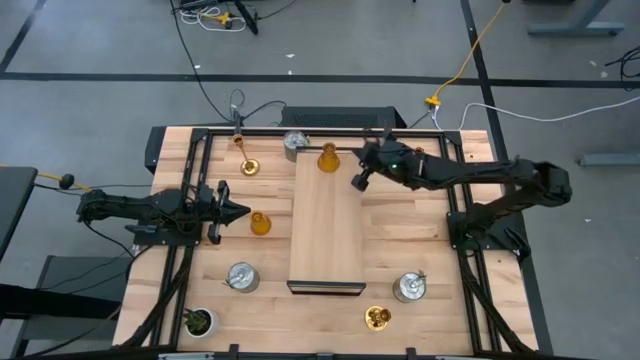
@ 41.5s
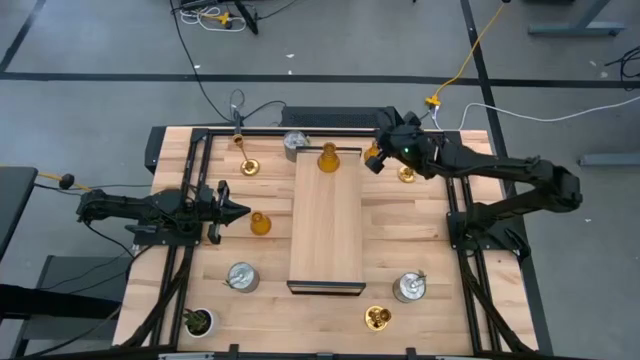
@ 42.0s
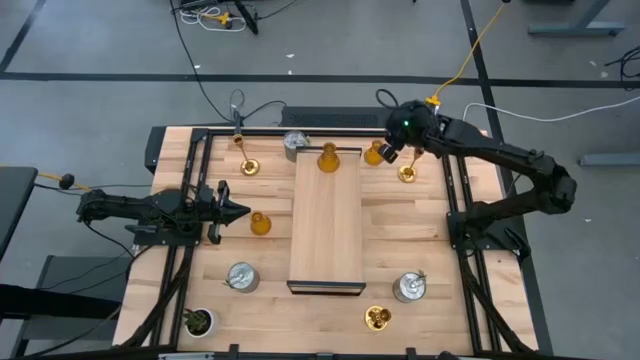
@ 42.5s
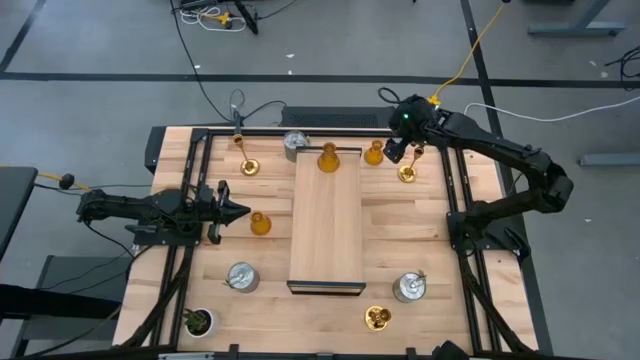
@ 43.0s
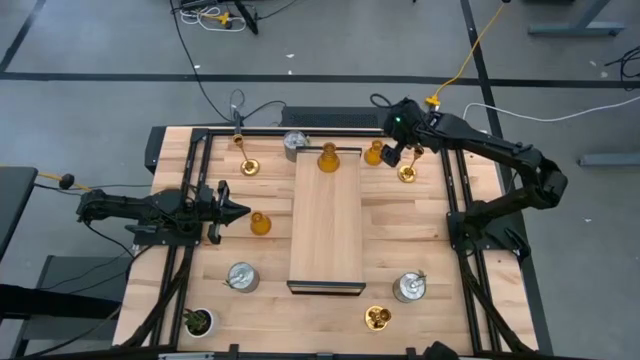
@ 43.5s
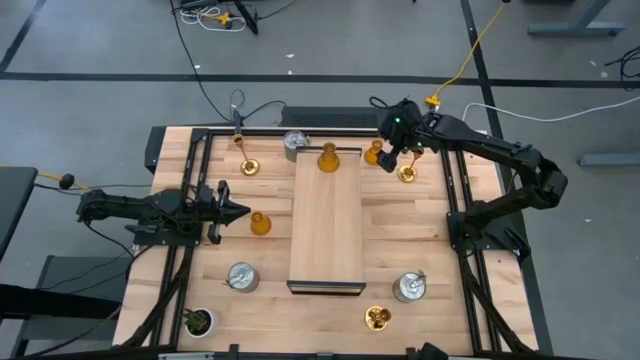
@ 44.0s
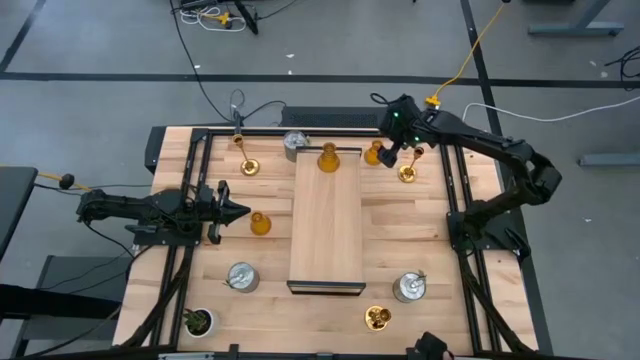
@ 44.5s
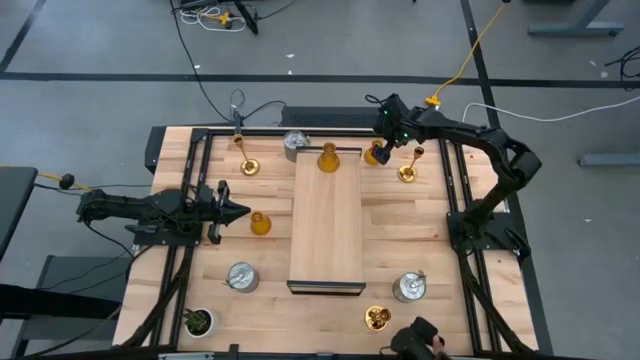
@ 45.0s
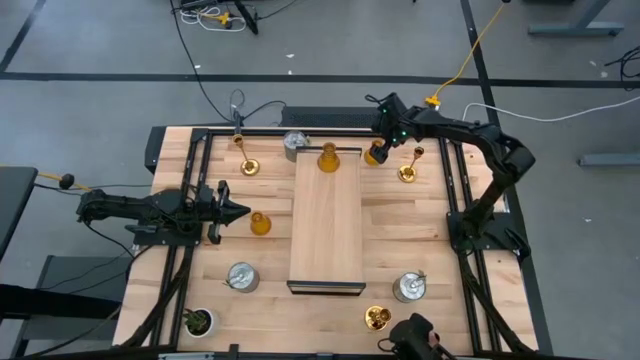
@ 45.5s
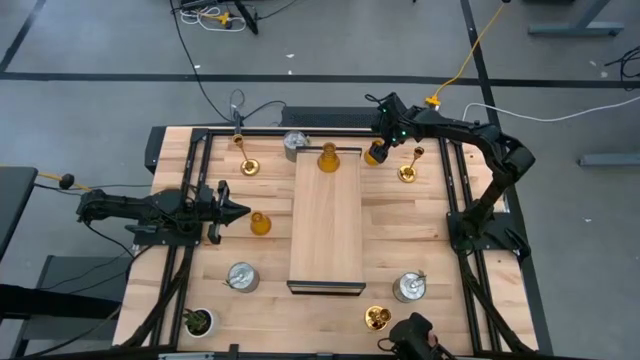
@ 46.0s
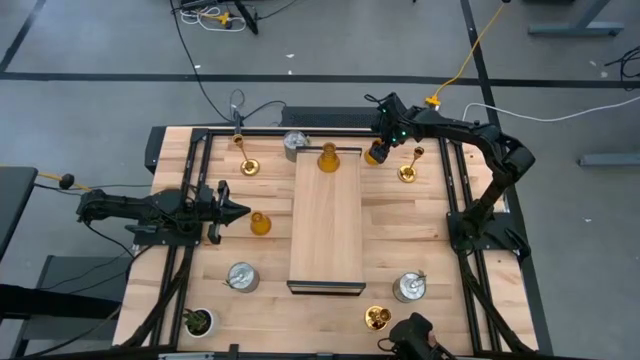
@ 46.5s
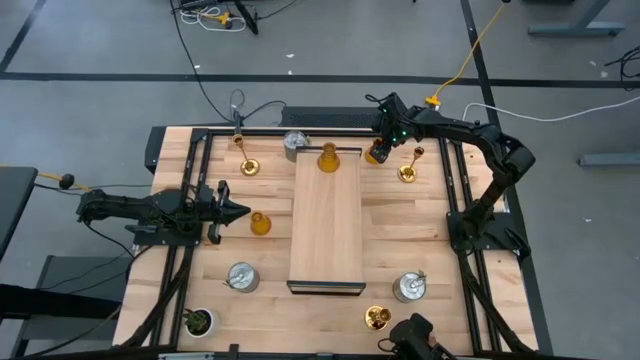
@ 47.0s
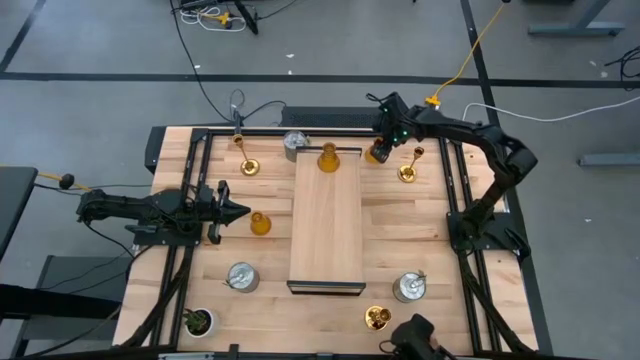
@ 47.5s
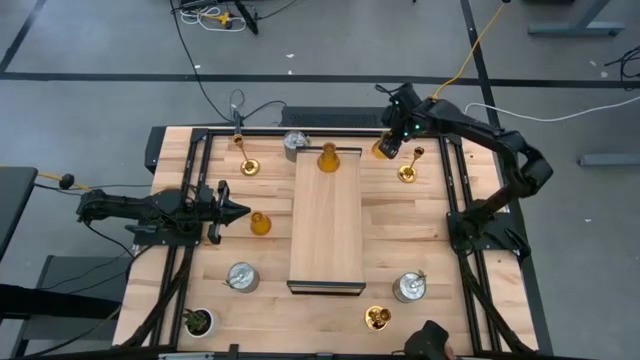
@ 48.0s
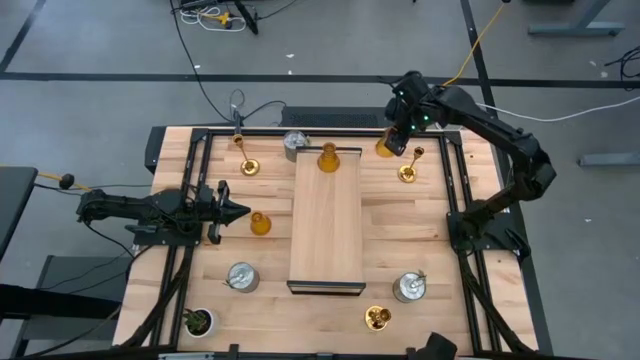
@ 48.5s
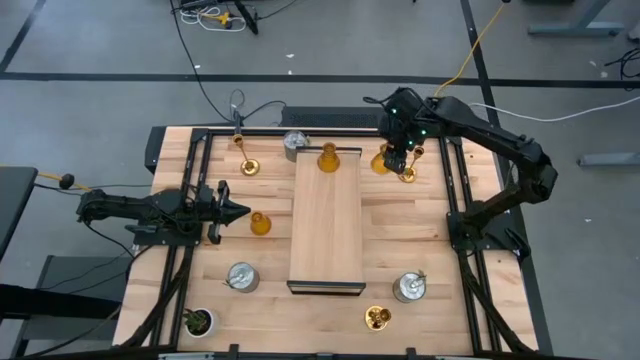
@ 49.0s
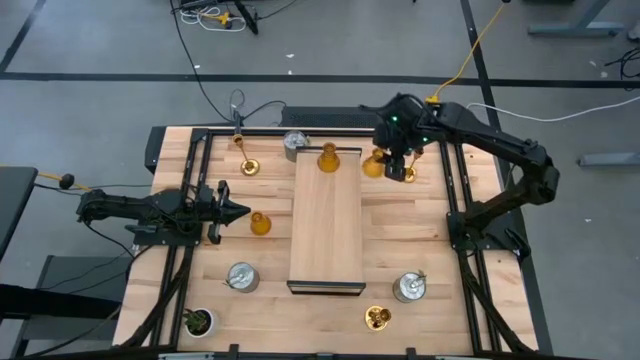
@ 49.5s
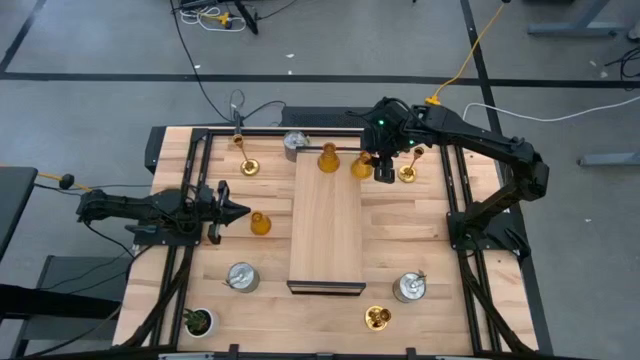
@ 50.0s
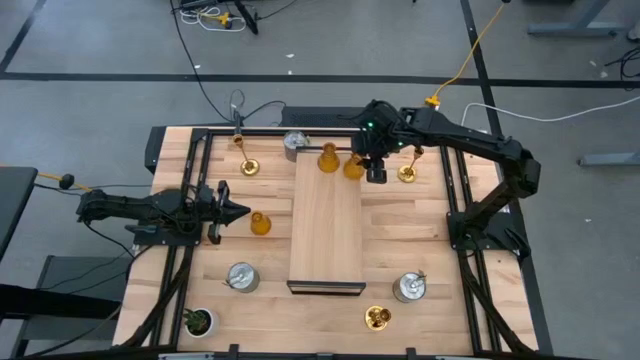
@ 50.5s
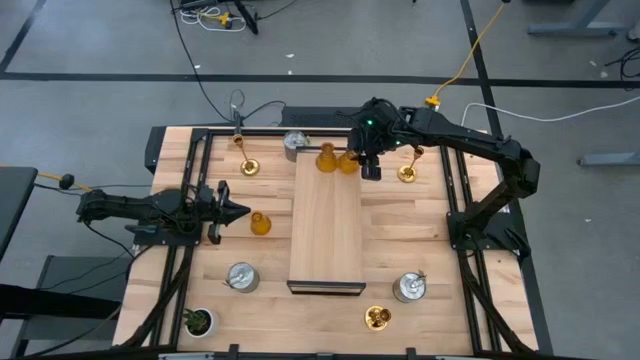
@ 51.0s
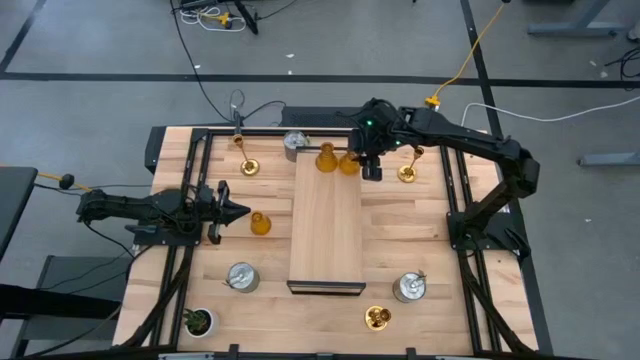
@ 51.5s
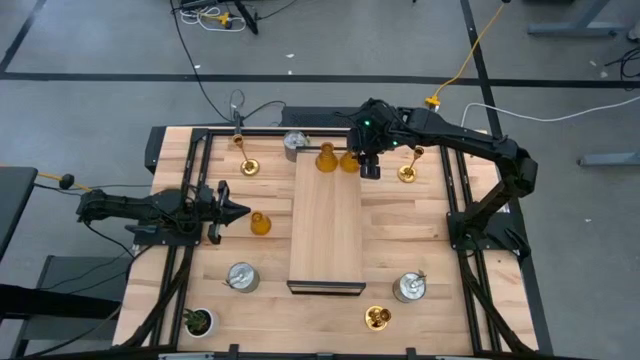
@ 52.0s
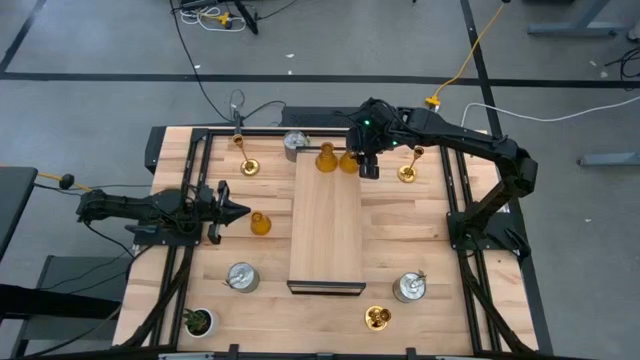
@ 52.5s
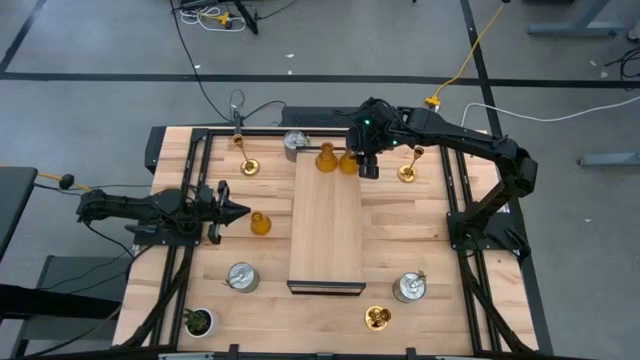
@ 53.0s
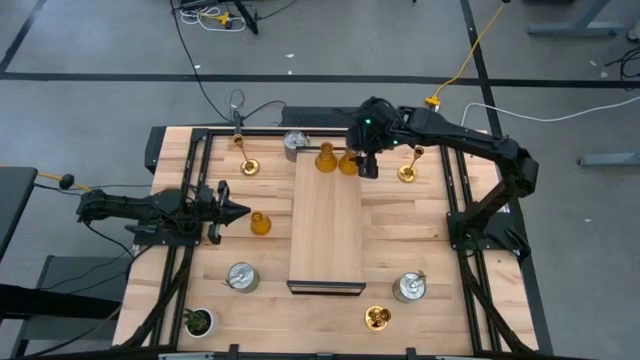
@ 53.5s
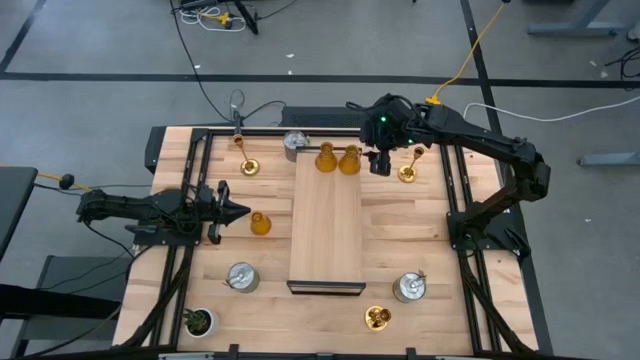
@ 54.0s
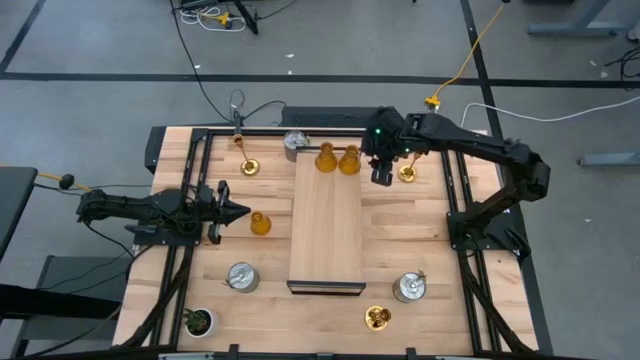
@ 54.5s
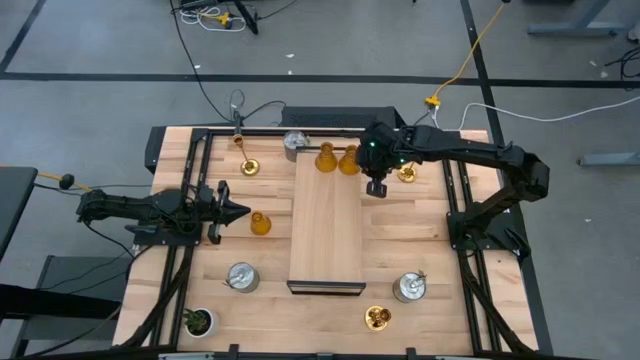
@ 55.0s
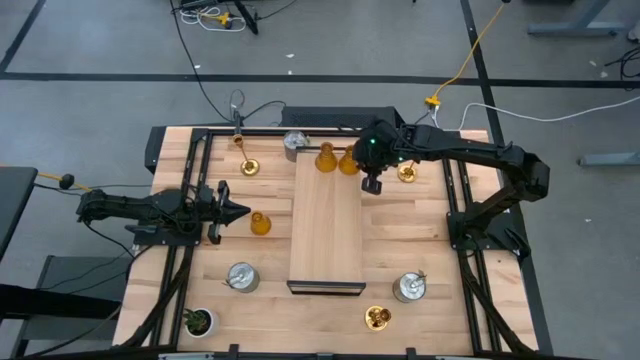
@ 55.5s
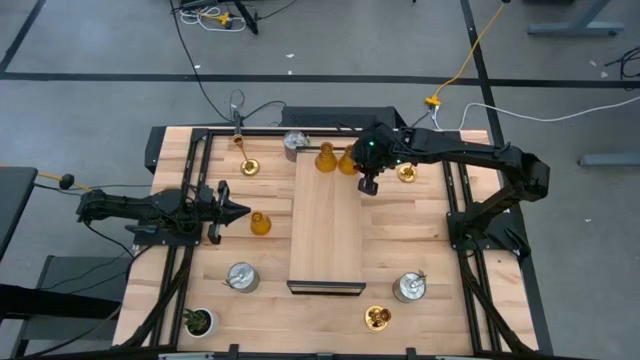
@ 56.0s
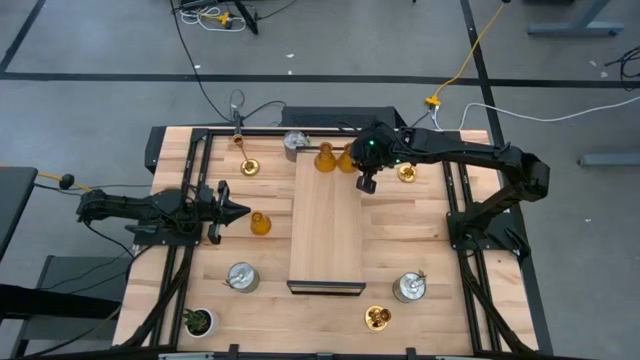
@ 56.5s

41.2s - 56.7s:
Task: Pick & Place candle stick holders
Put the top right glass candle holder on the shelf aligned with the other glass candle holder

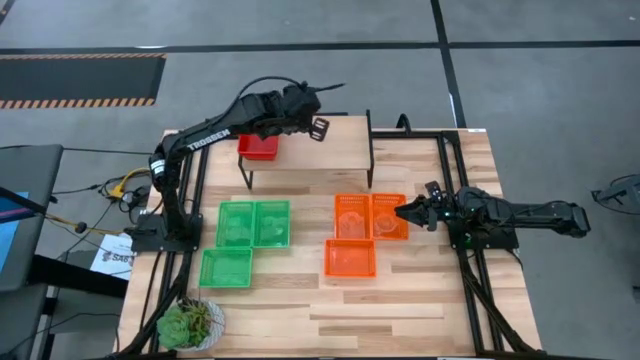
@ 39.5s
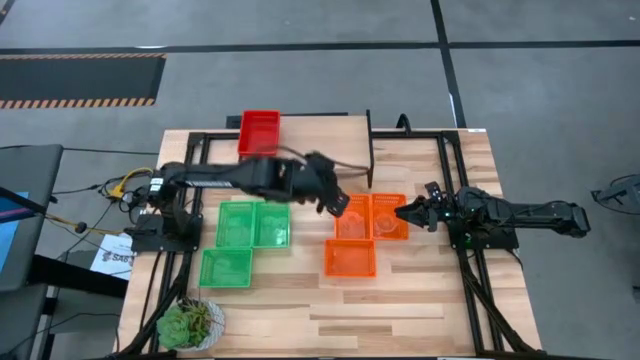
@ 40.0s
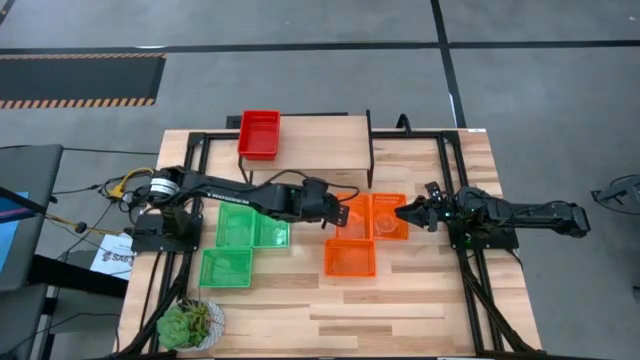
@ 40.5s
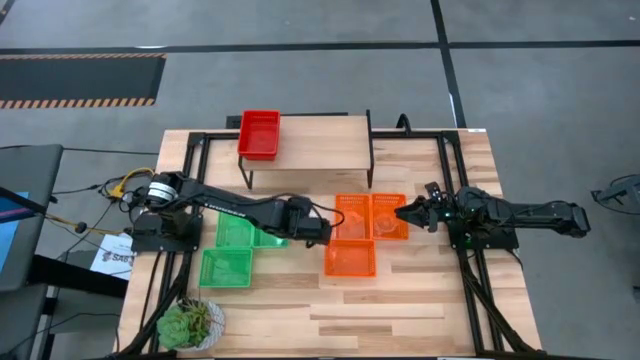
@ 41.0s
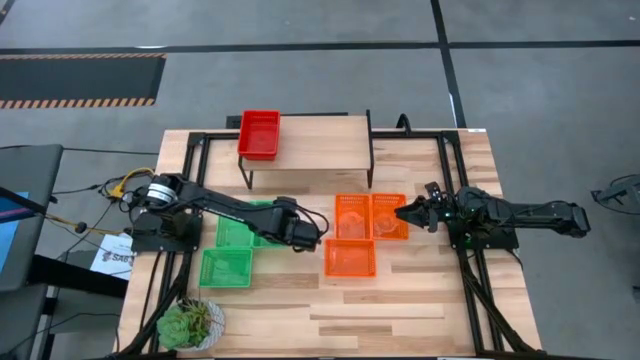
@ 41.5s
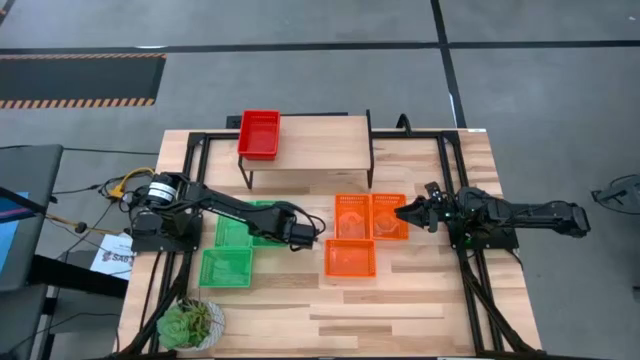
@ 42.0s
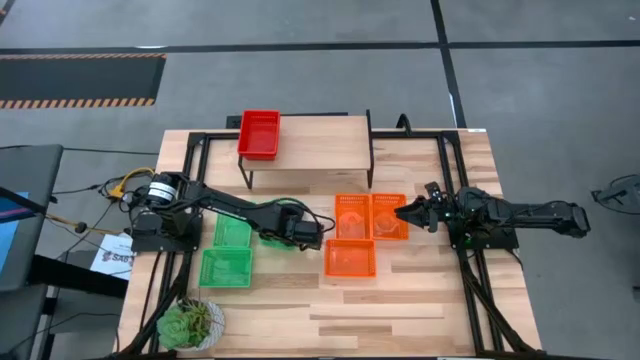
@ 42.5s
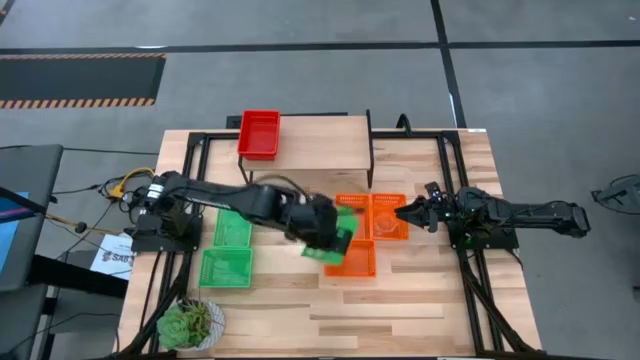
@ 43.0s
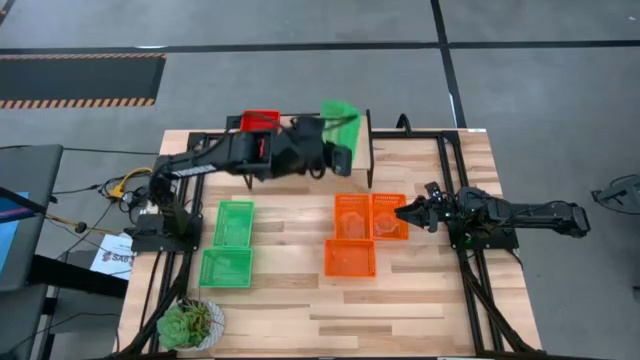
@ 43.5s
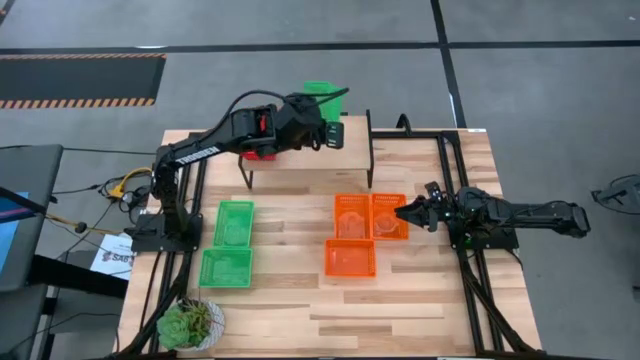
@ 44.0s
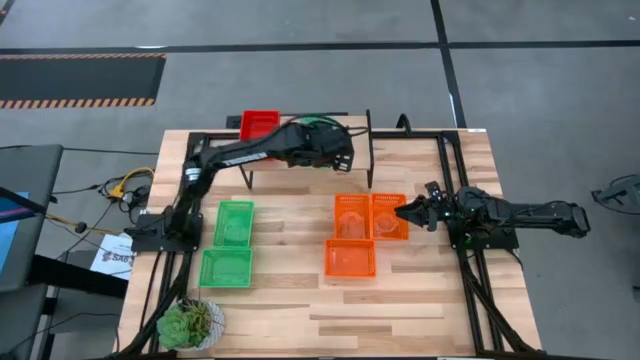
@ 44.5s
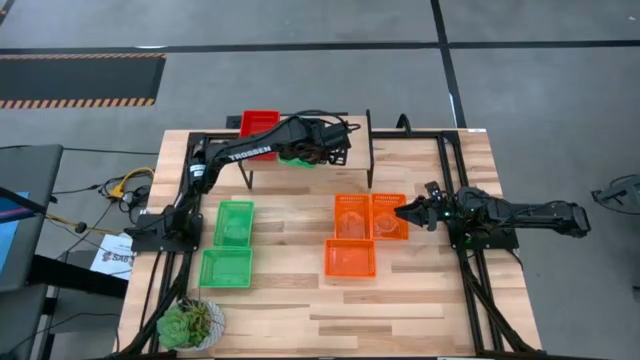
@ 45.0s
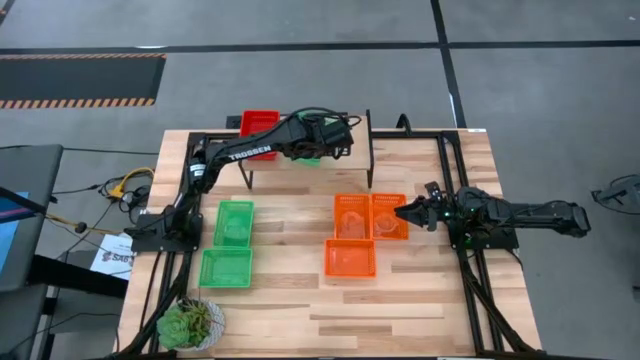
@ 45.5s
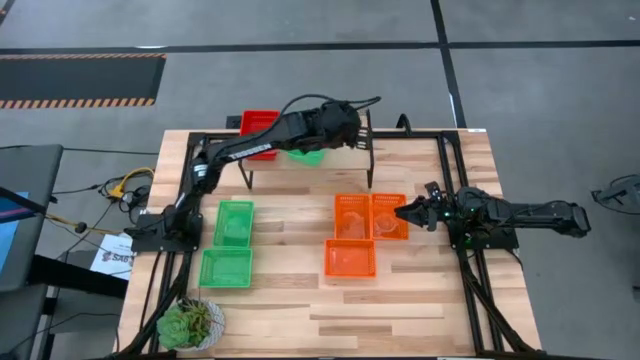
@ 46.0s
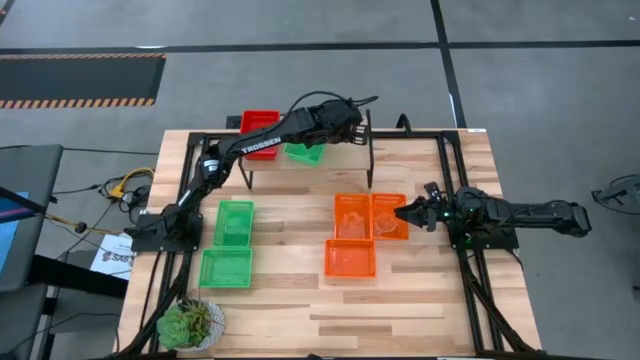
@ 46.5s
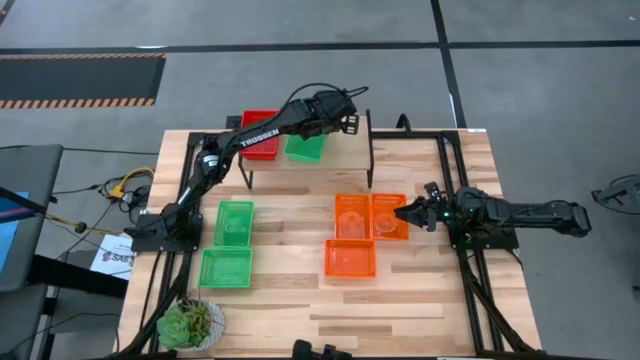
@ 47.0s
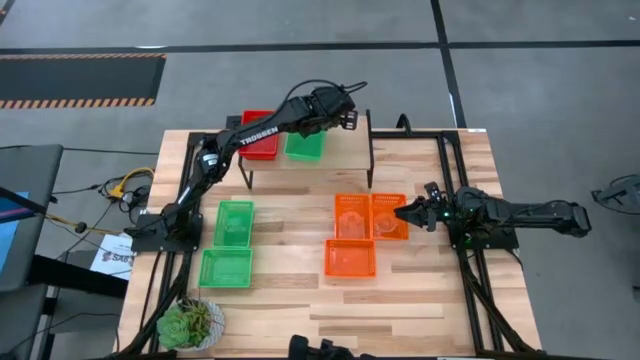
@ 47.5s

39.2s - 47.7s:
Task: Stack baskets on shelf by color
Put the right green bin on the shelf
